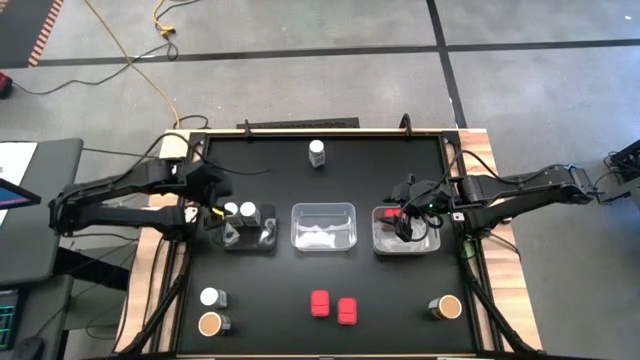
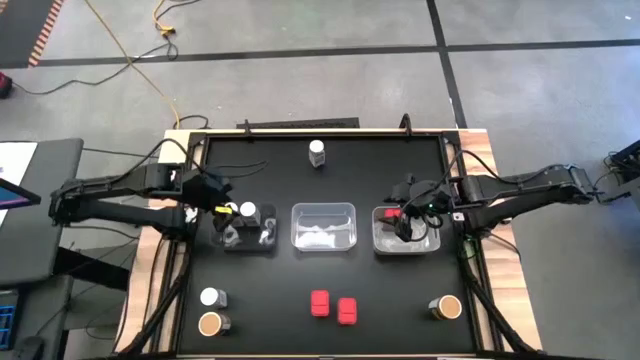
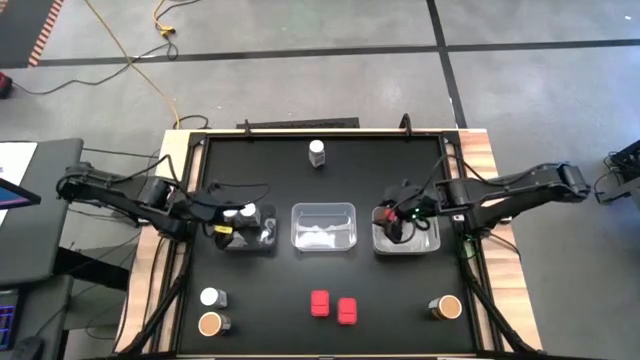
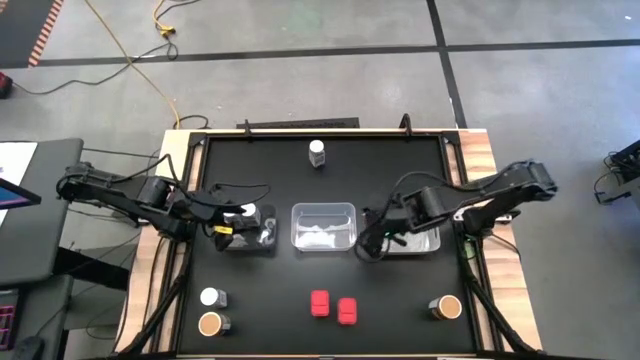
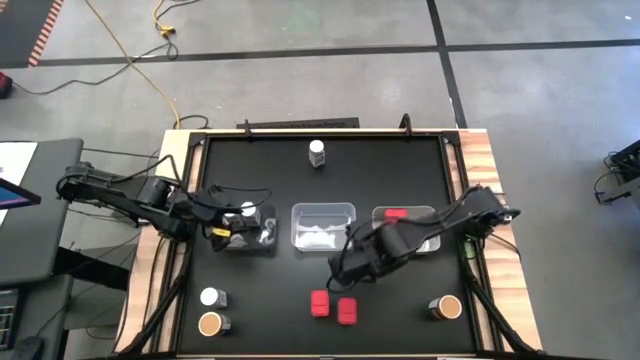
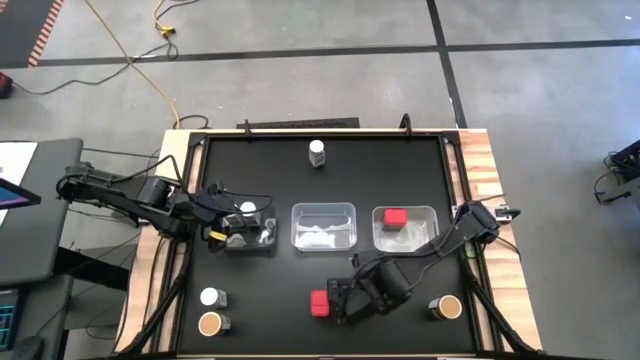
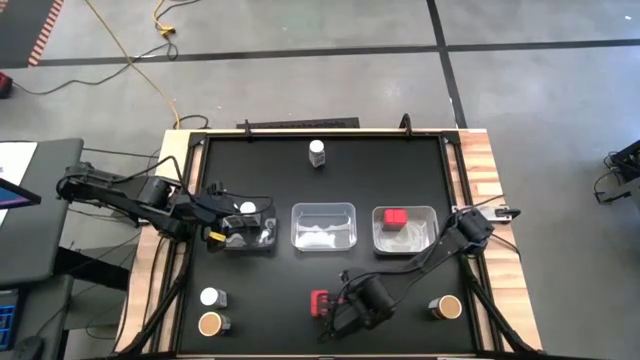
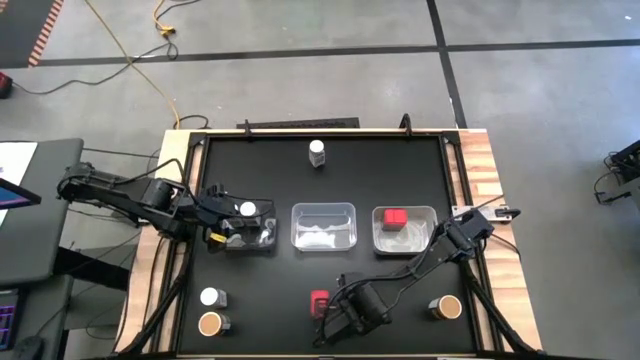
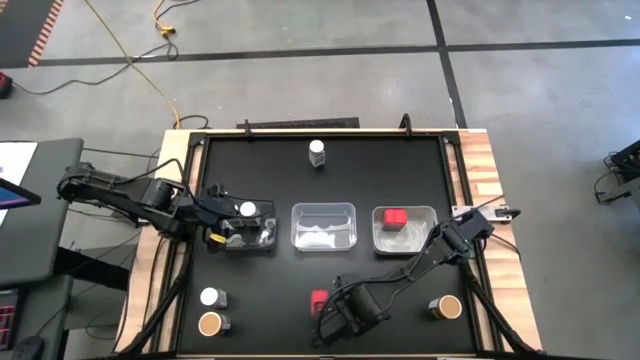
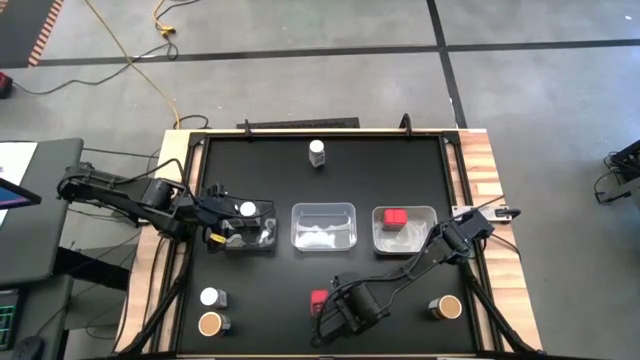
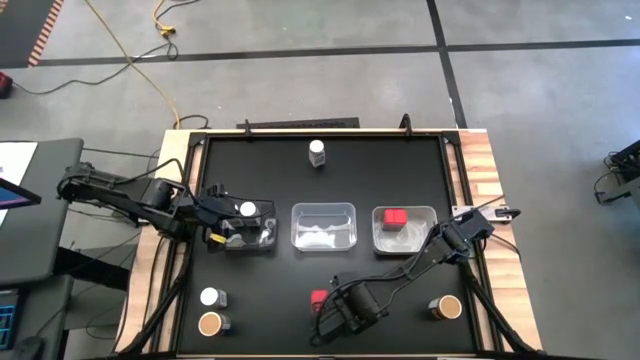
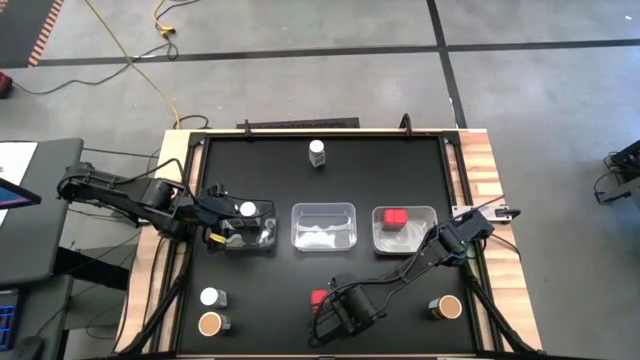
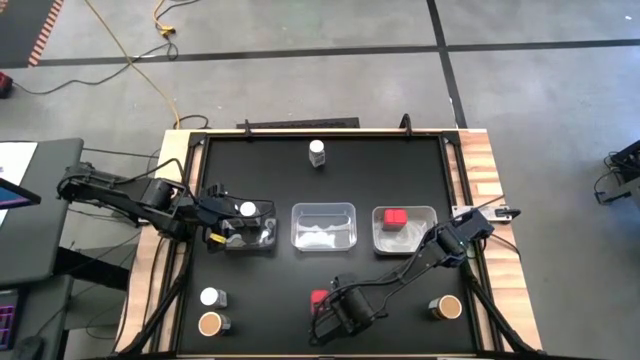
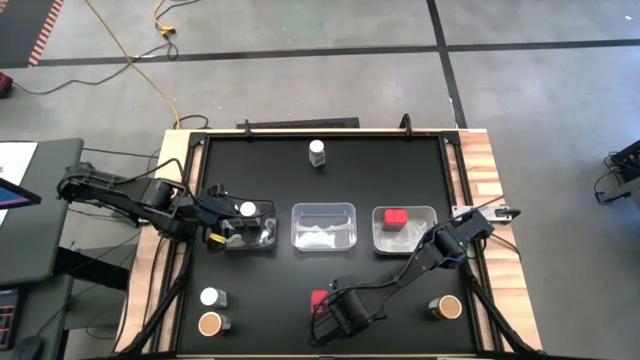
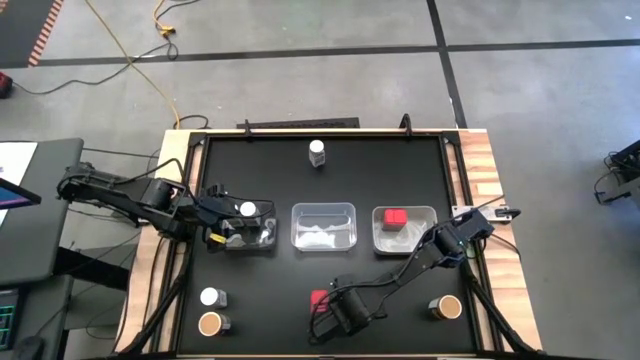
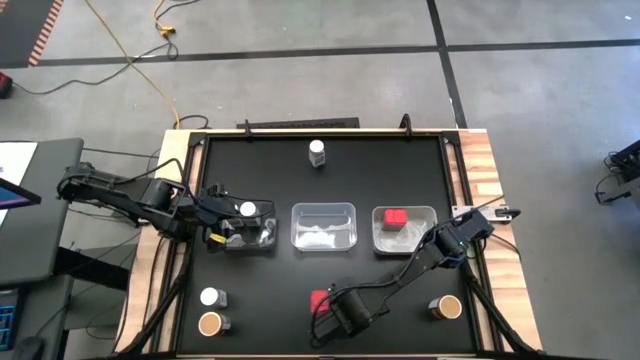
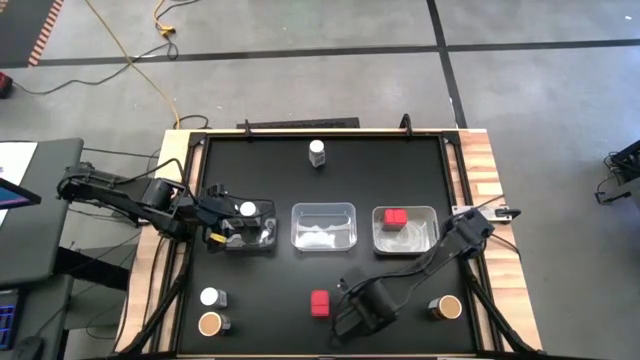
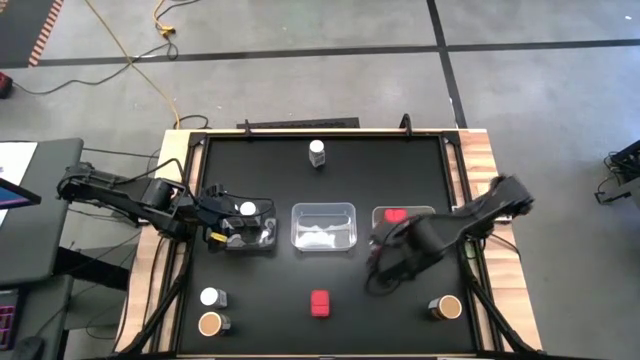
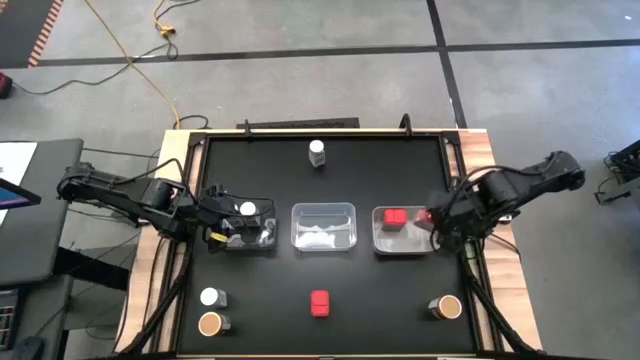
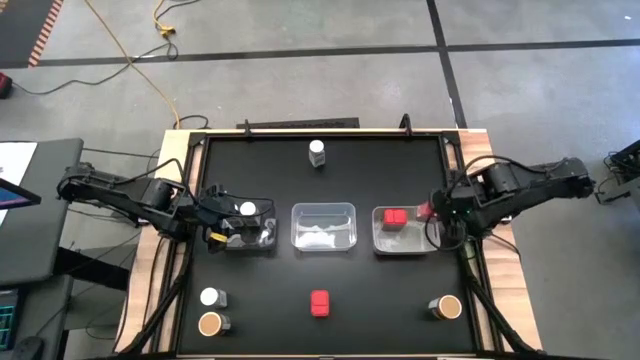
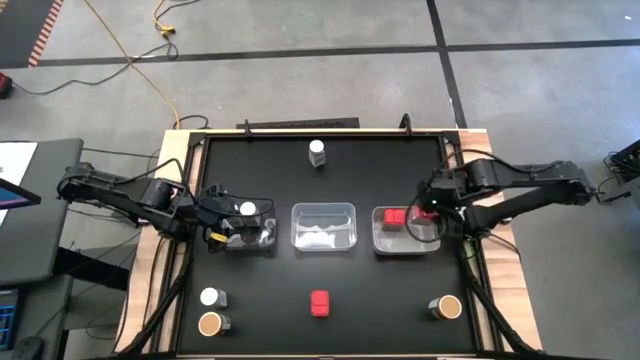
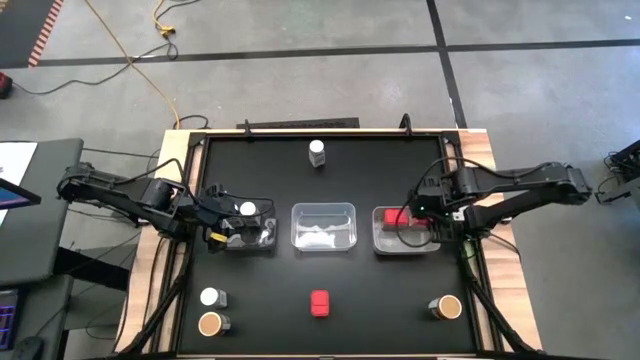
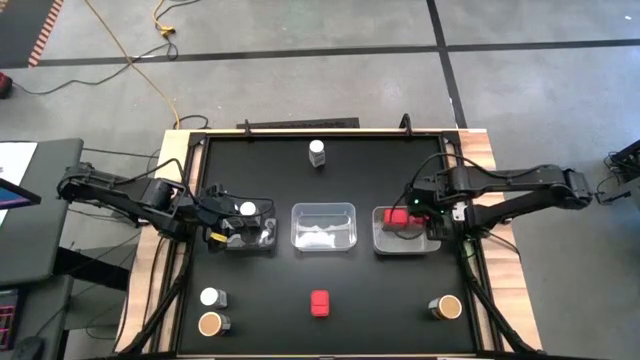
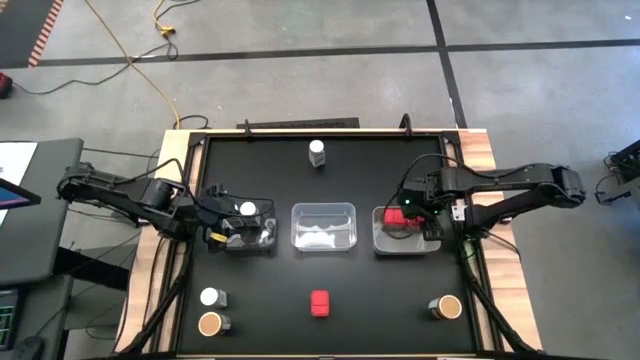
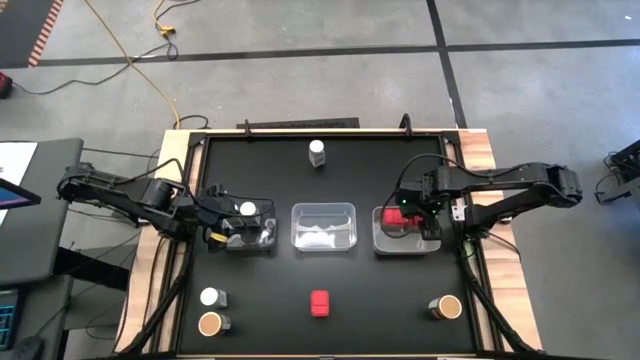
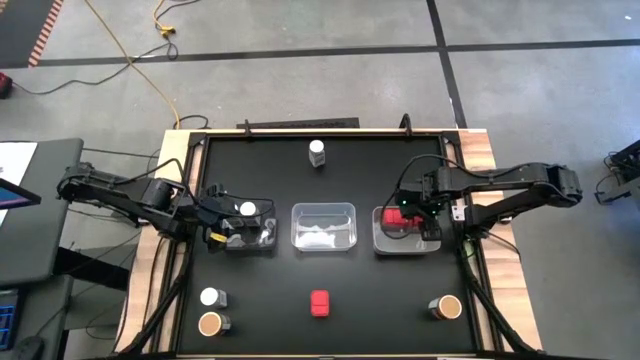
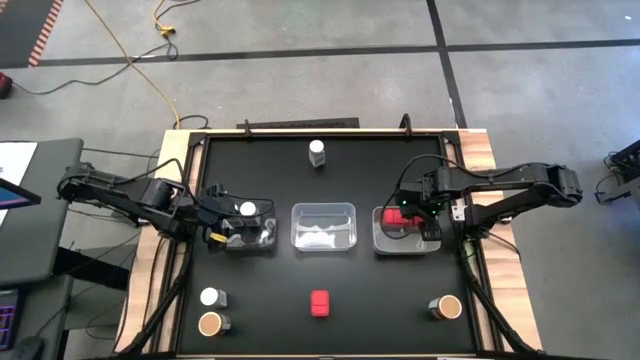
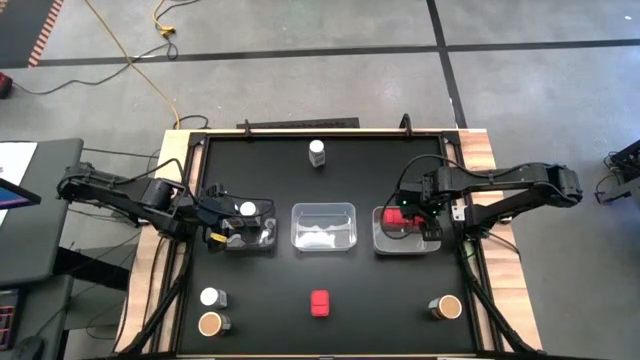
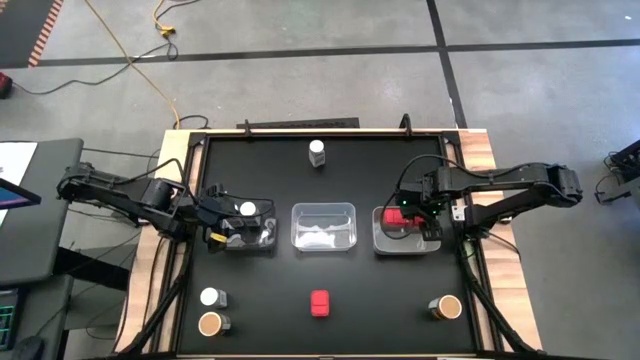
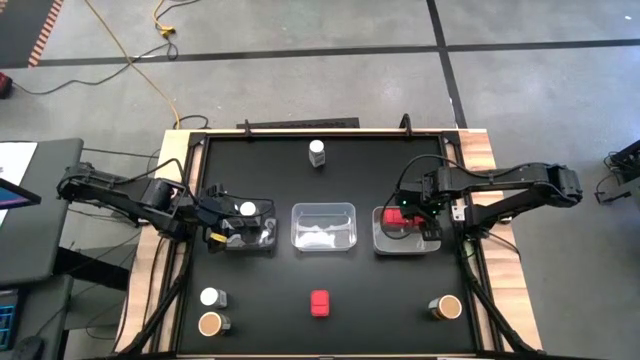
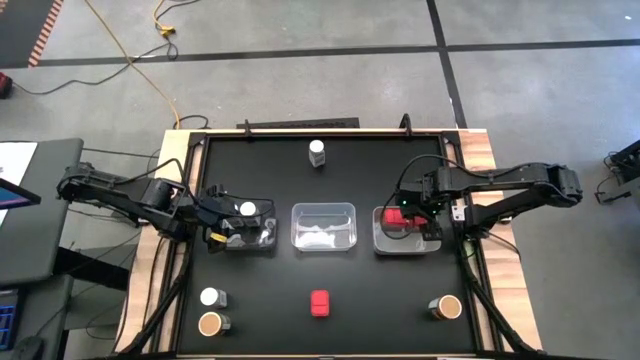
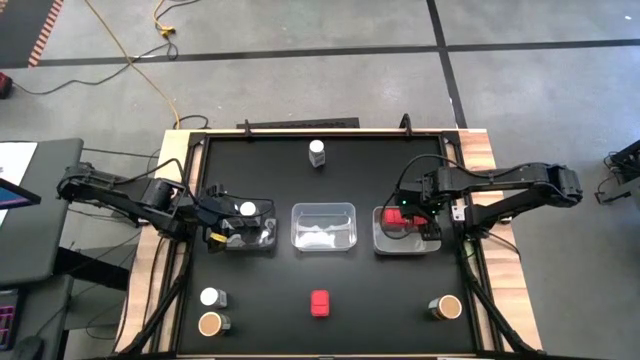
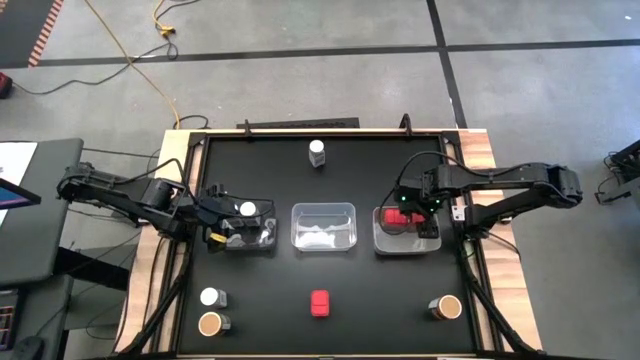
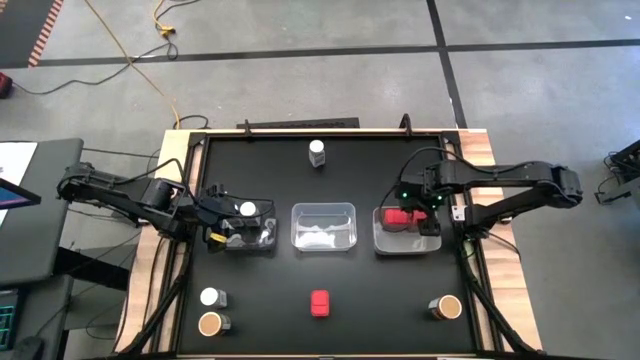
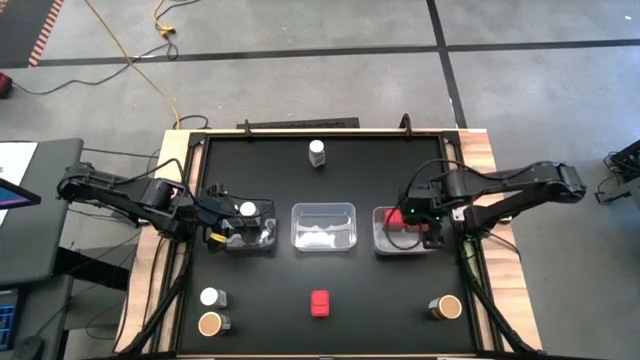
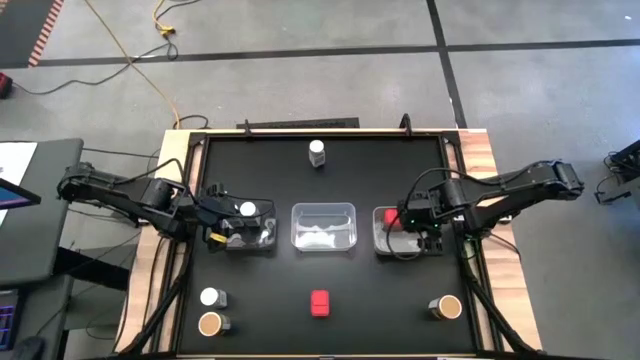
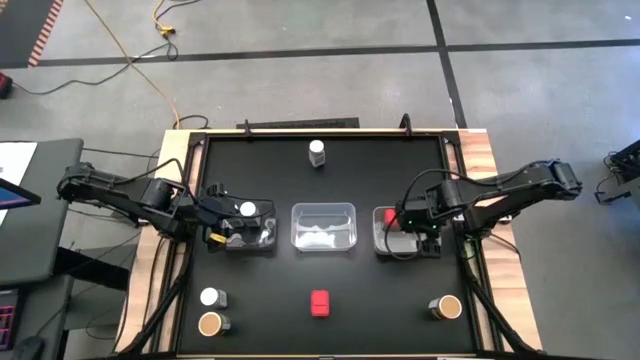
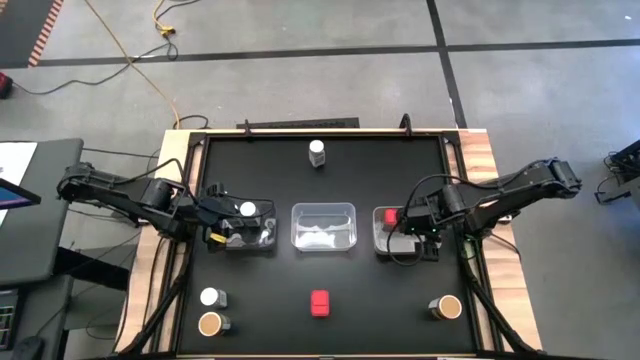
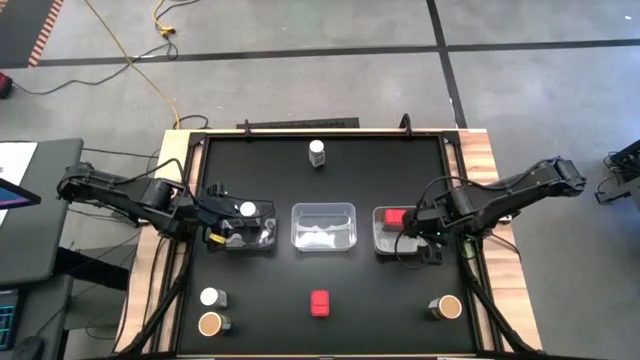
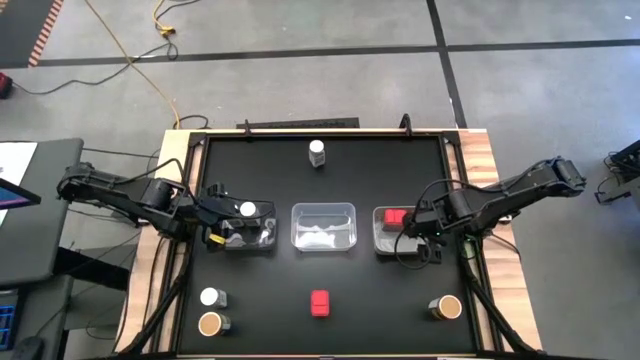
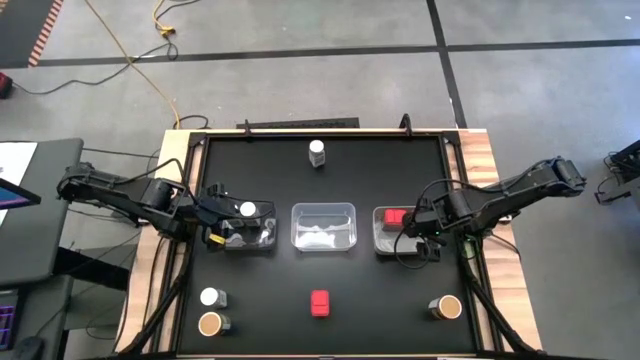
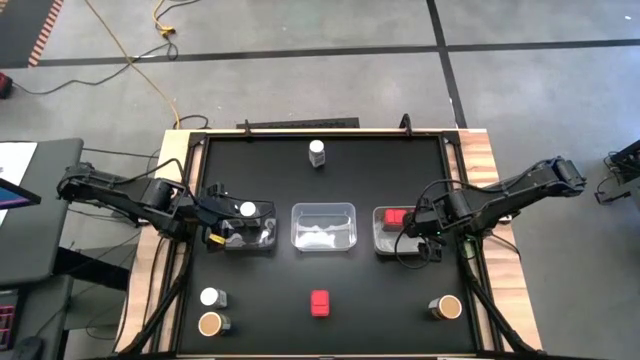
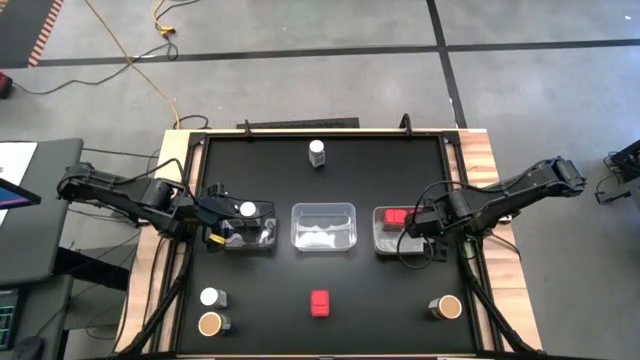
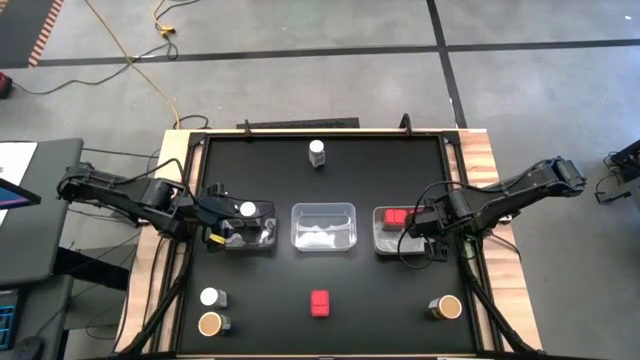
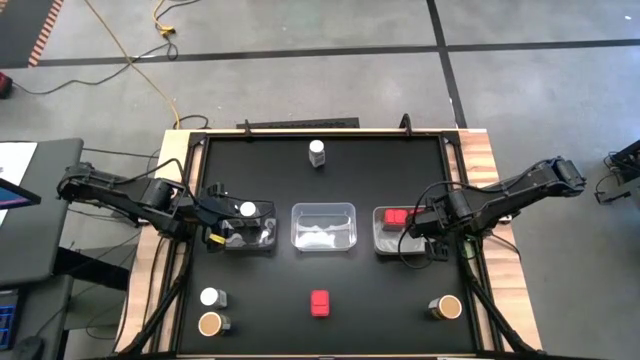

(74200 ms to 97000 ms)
Task: Sort spices by type
Put the left red seasoning can into the white bin
